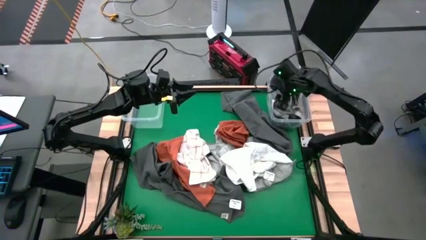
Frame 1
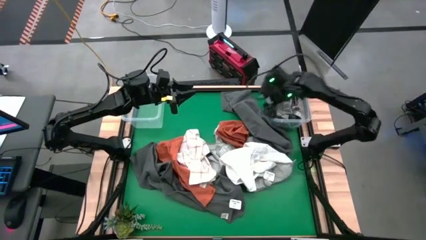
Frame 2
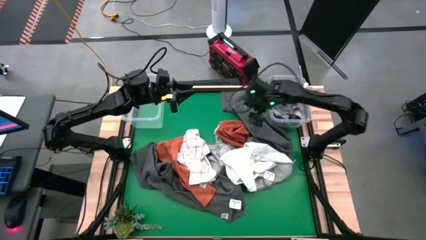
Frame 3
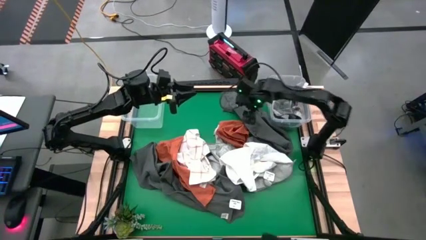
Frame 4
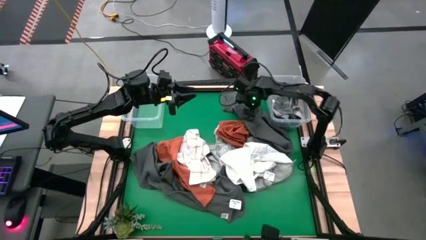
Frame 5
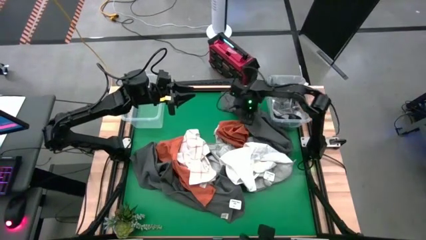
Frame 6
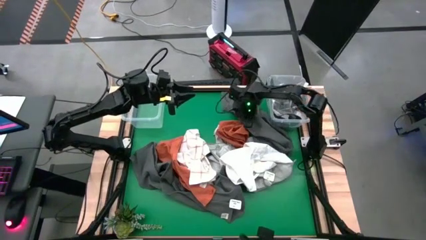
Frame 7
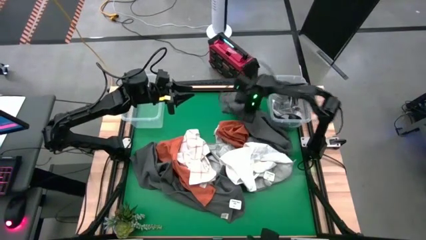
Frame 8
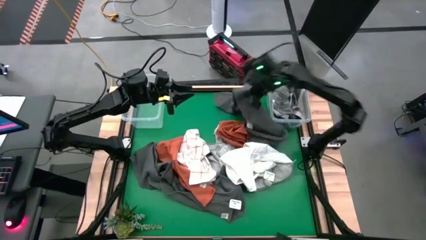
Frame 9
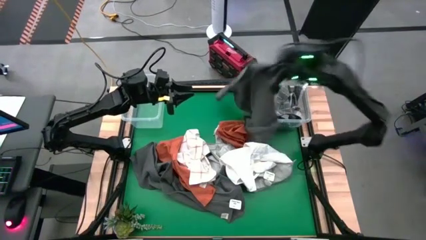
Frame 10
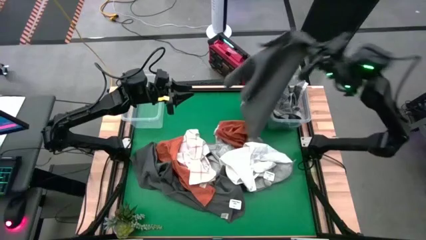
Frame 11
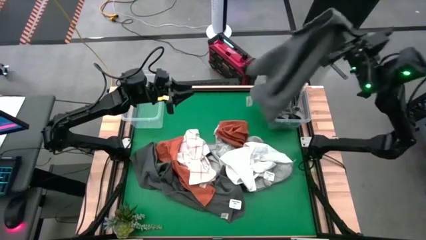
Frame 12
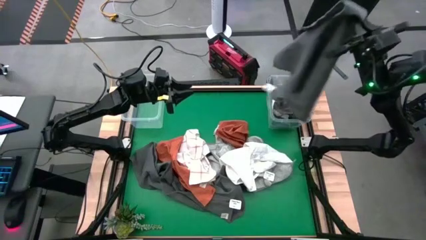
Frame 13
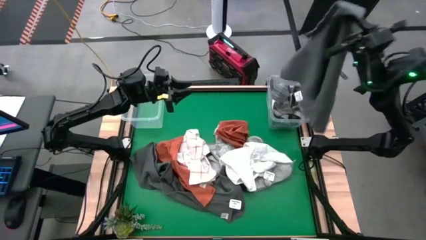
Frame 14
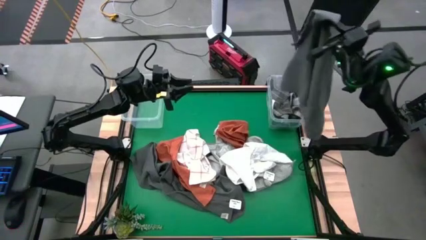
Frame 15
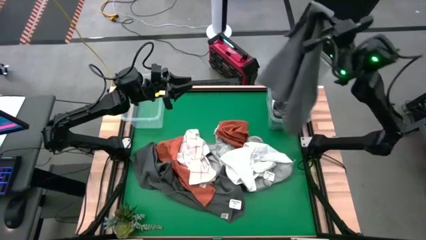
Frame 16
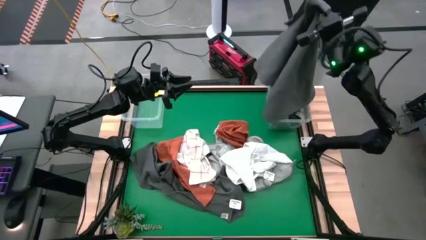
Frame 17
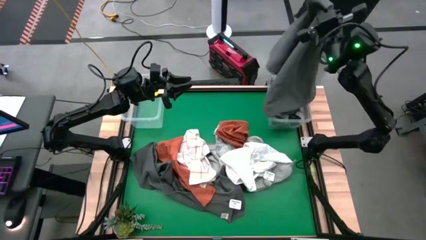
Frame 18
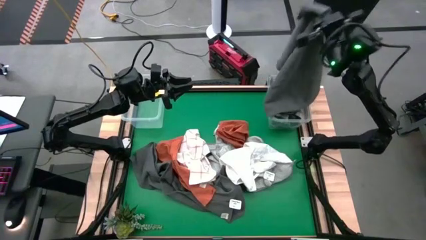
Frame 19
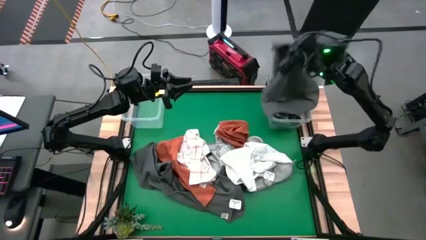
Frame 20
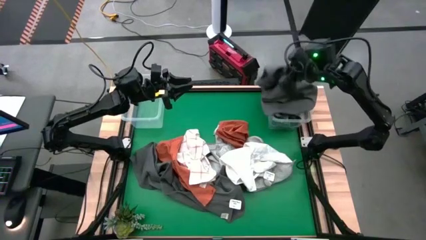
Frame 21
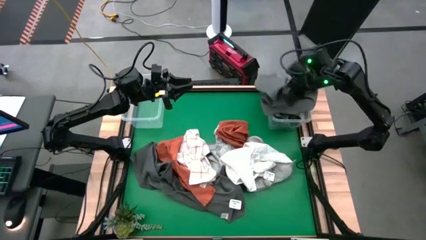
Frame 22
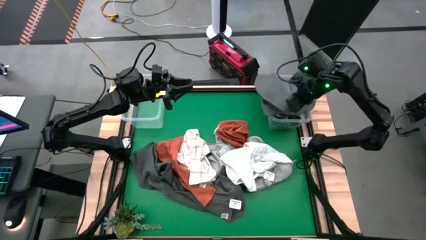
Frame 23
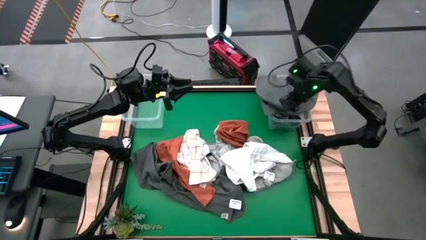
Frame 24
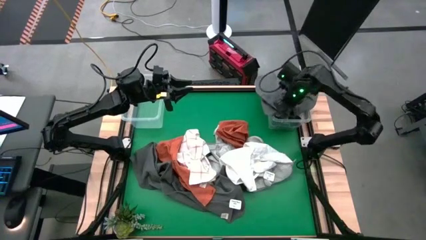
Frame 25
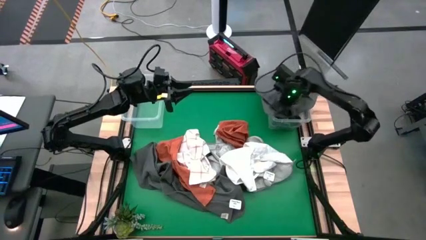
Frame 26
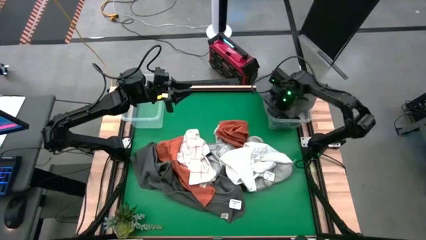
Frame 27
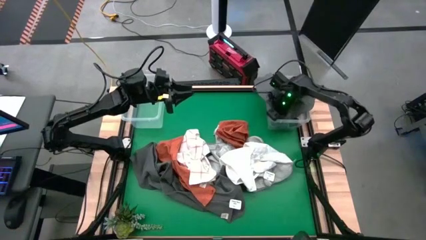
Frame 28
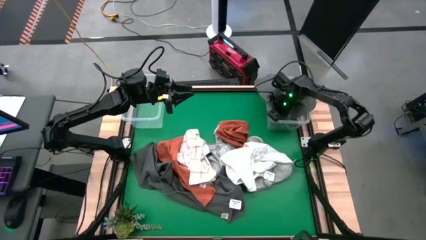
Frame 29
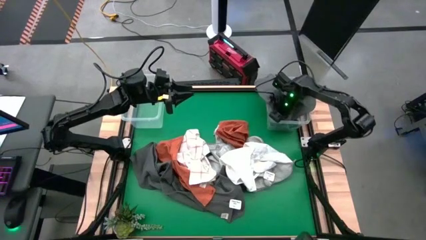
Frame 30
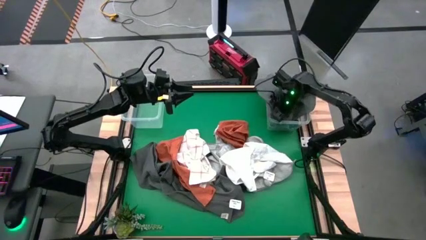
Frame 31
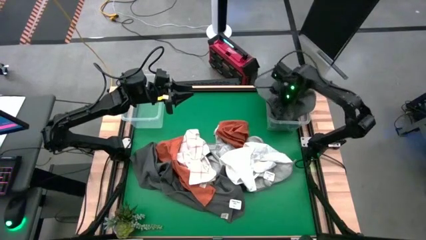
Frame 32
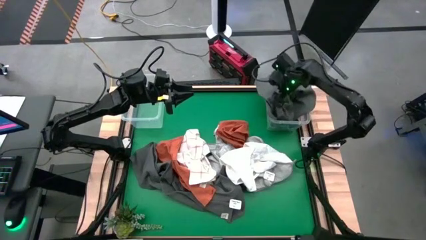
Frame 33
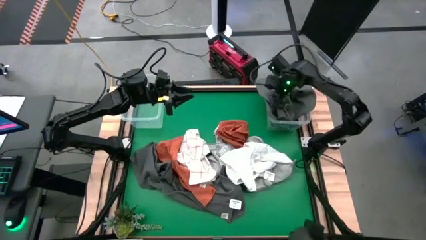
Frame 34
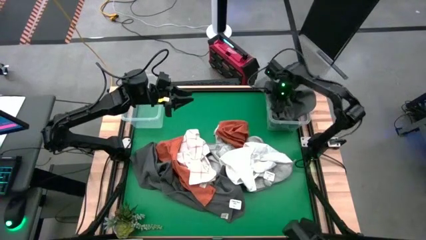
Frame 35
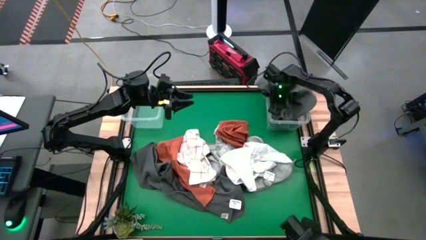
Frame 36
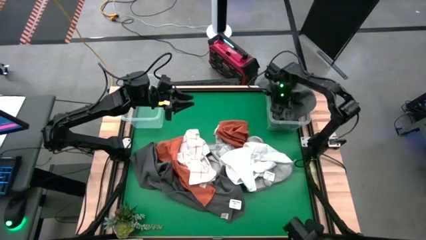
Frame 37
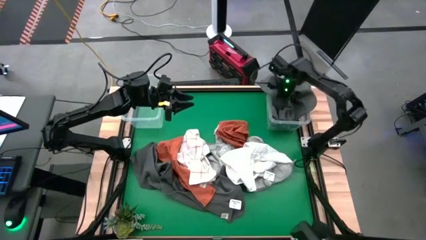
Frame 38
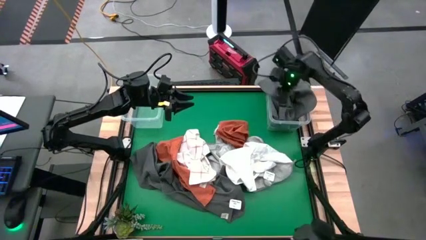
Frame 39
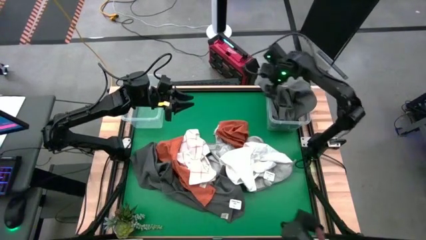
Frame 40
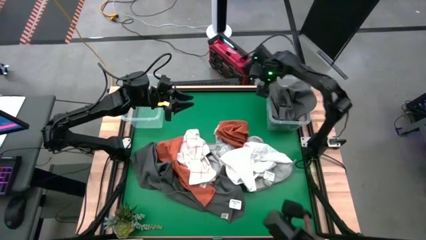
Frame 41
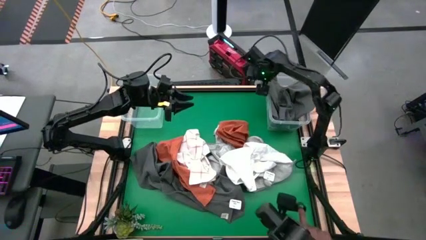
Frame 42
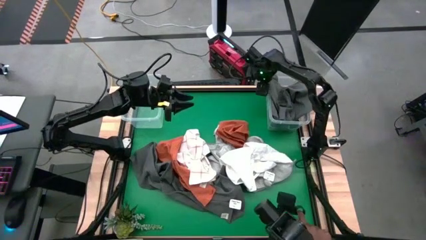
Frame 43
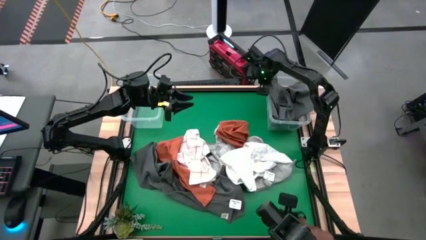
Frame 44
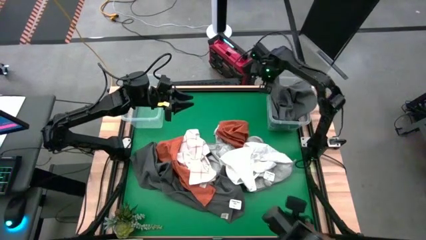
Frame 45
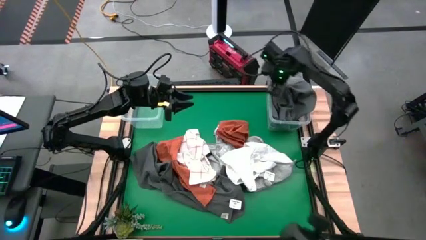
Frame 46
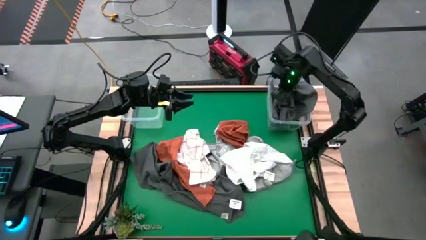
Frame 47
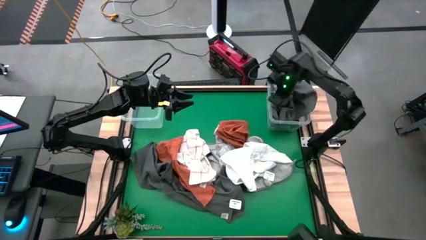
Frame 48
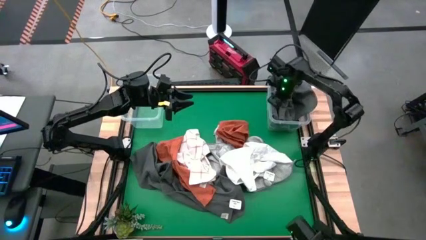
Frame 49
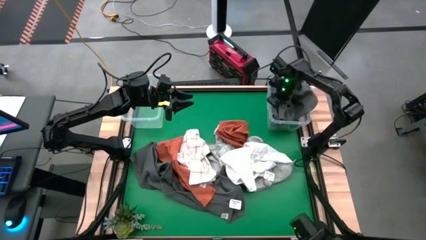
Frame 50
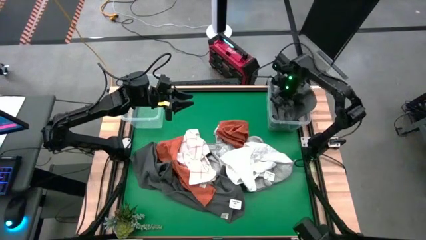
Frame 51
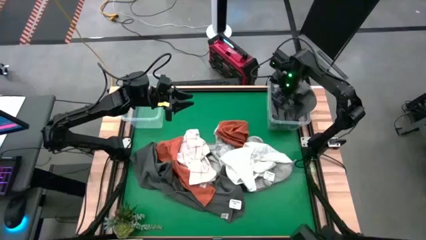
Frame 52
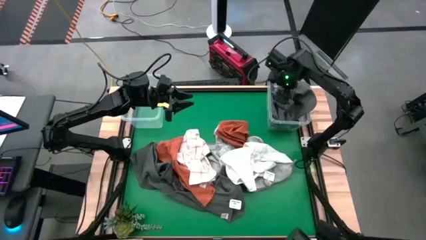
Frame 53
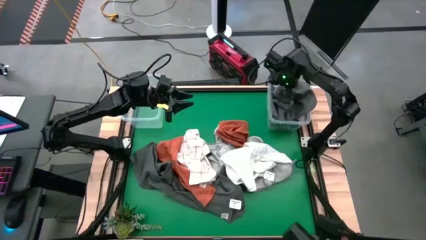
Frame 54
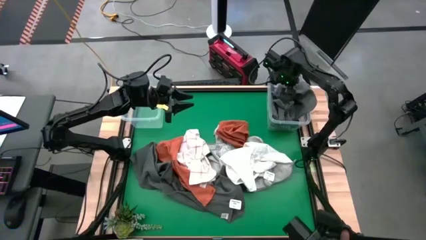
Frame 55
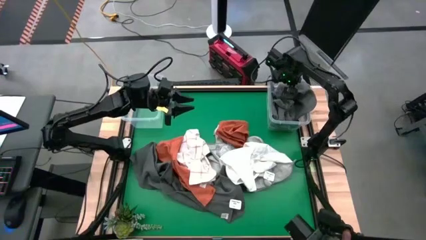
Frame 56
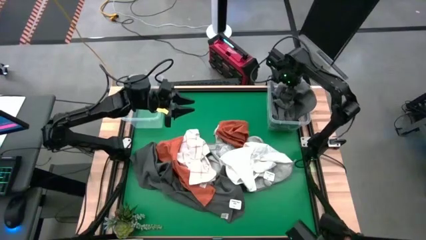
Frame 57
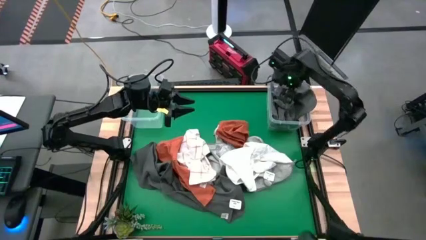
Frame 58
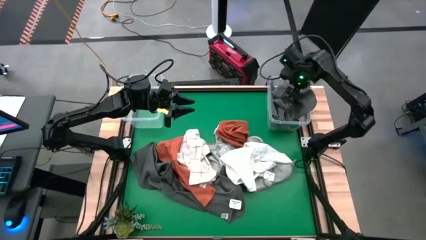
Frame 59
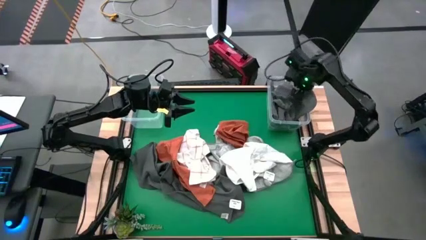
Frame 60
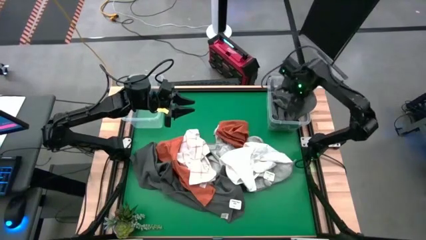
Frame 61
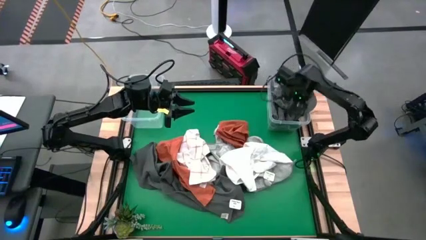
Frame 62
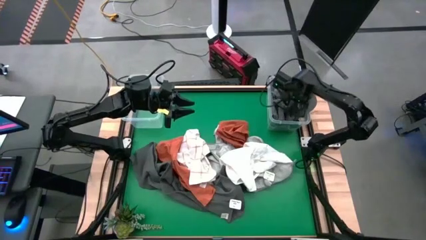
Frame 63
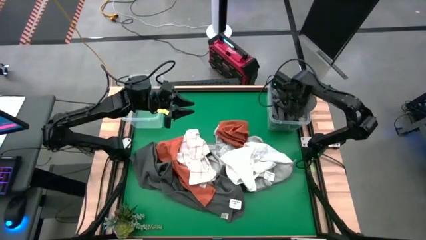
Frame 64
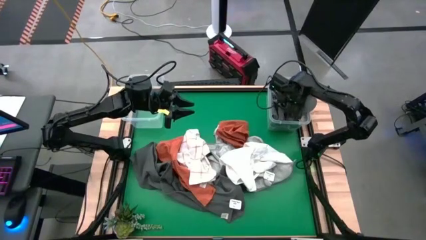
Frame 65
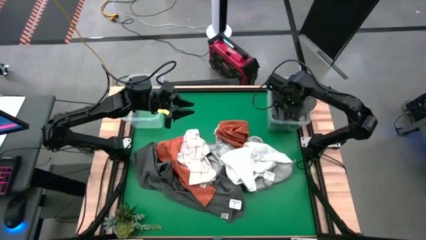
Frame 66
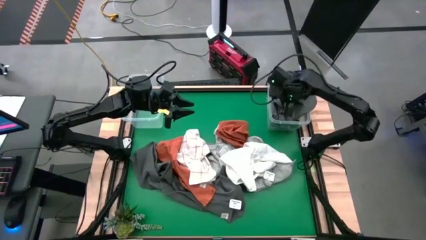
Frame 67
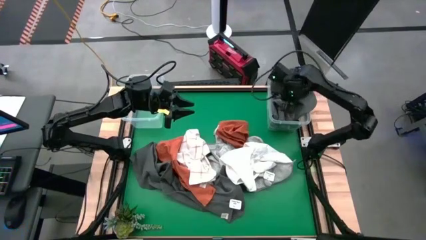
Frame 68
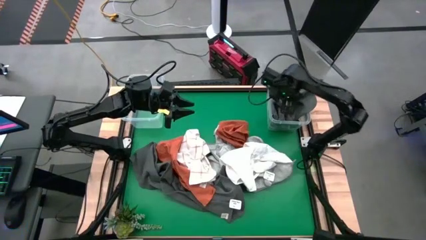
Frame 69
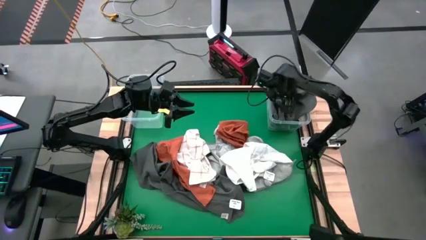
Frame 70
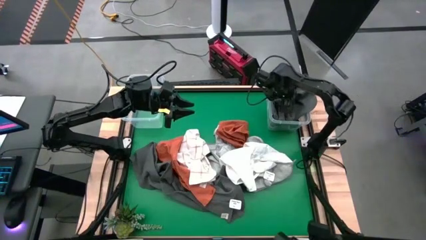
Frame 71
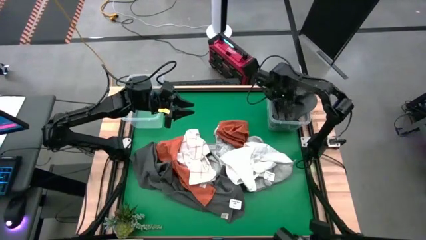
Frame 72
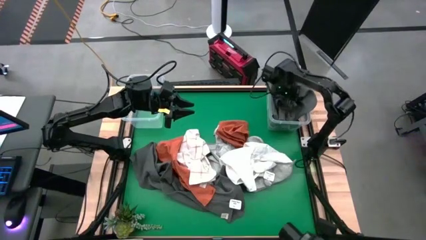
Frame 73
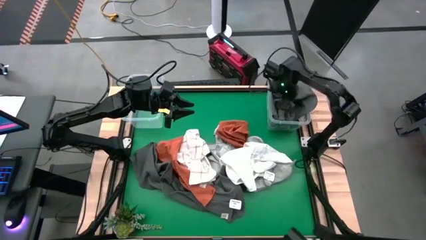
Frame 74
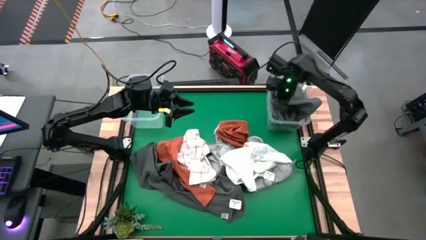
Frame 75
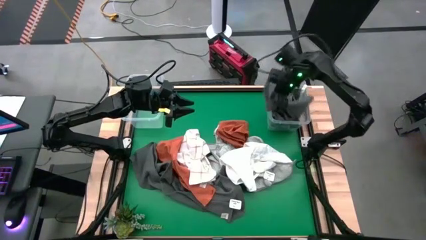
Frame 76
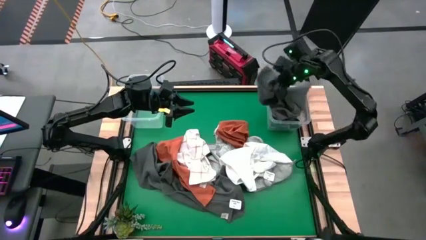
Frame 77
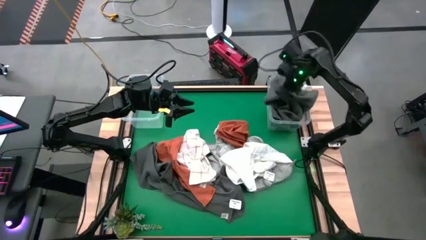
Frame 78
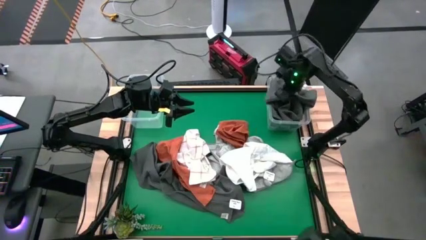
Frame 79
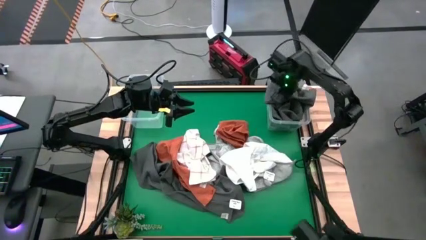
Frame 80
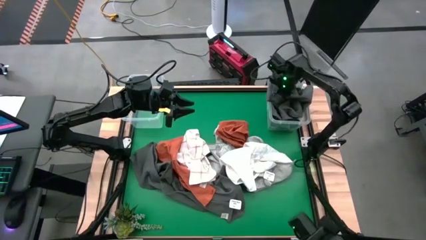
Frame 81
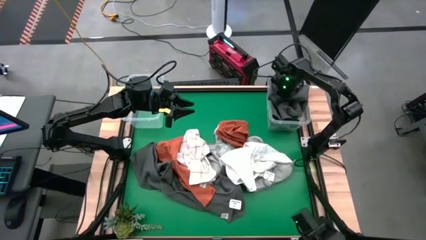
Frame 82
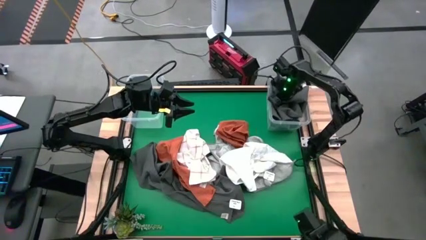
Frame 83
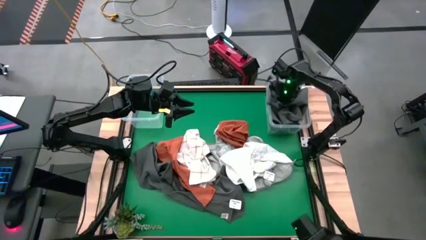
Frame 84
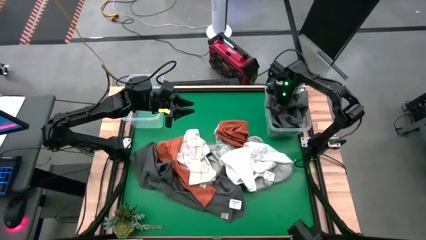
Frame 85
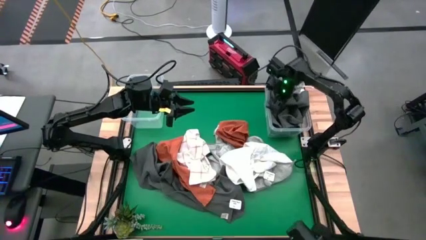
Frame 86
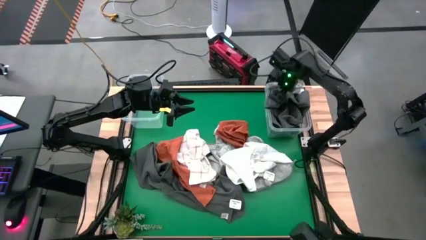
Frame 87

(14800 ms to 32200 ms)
Task: Sort towels by color in basket
Put the gray towel into the right transparent bin
